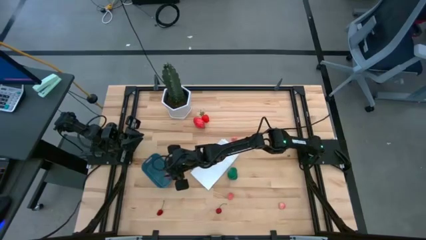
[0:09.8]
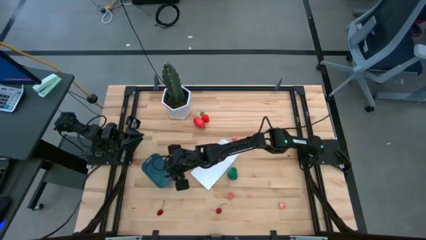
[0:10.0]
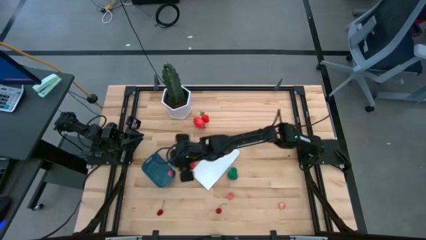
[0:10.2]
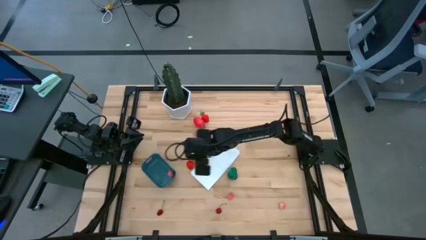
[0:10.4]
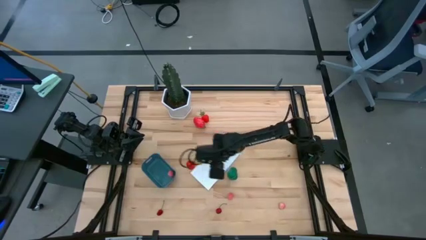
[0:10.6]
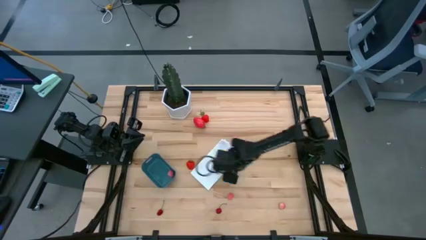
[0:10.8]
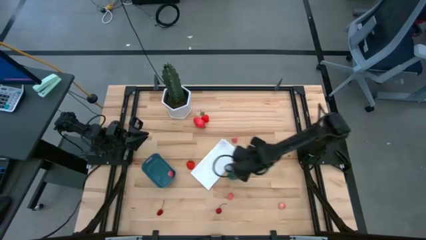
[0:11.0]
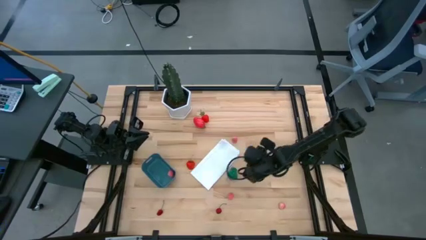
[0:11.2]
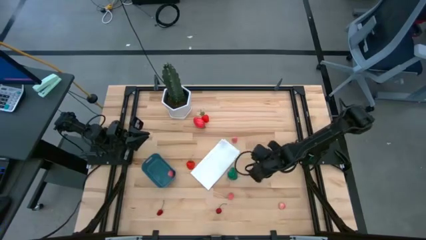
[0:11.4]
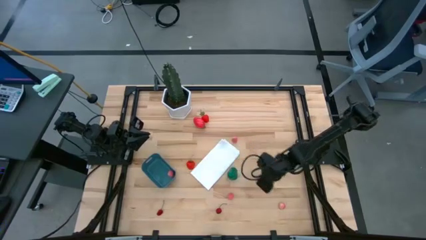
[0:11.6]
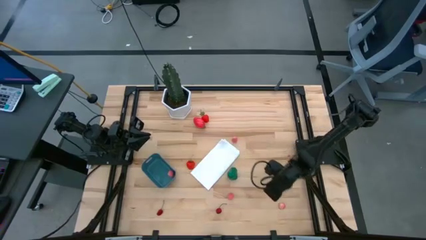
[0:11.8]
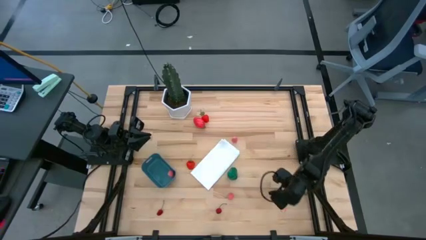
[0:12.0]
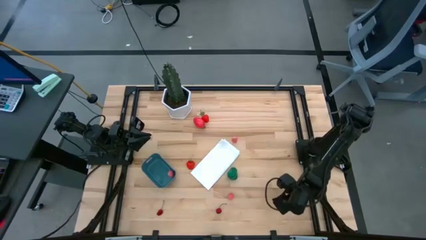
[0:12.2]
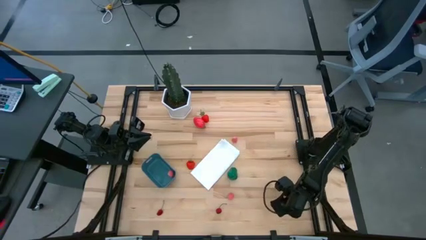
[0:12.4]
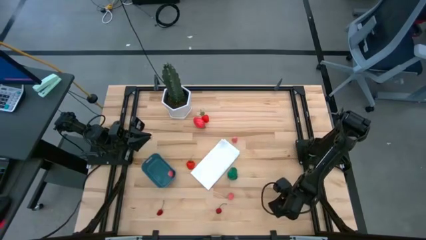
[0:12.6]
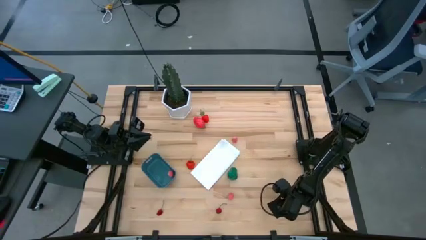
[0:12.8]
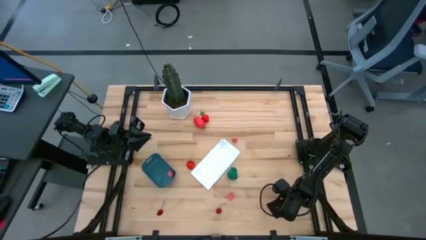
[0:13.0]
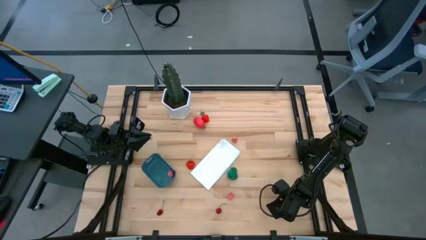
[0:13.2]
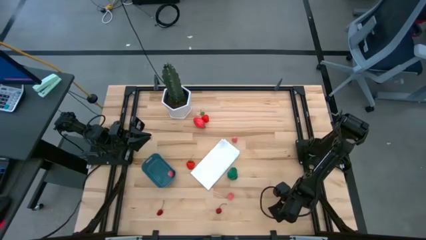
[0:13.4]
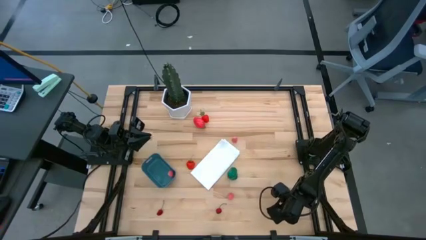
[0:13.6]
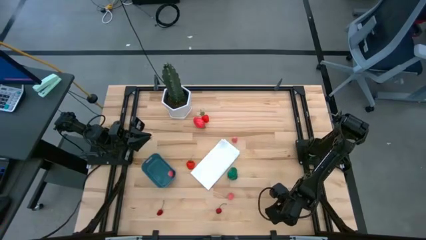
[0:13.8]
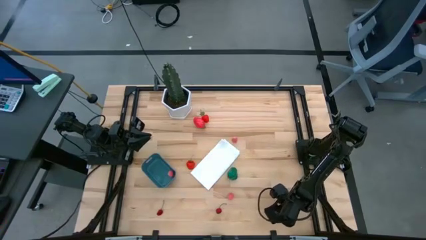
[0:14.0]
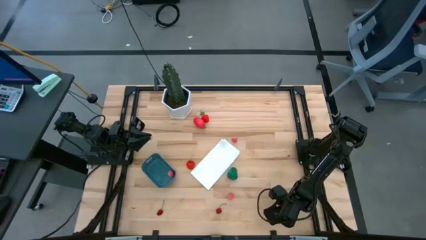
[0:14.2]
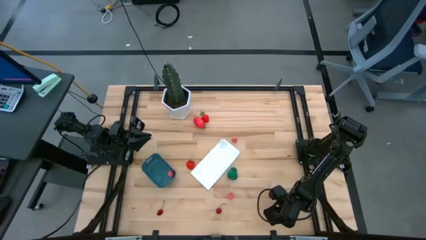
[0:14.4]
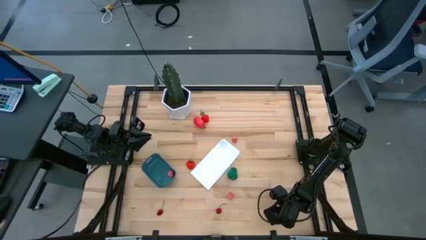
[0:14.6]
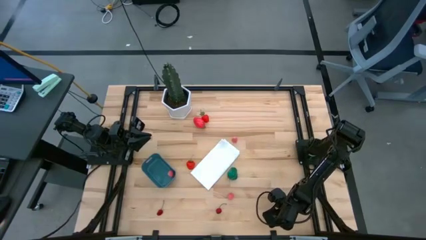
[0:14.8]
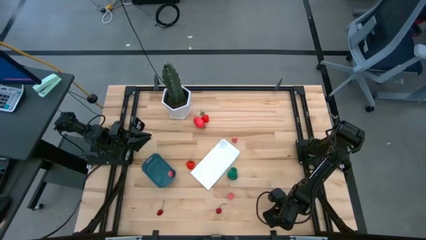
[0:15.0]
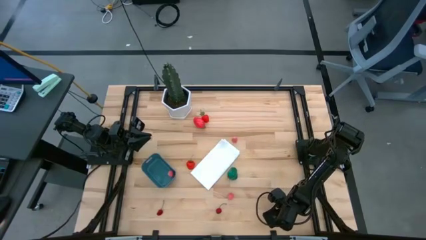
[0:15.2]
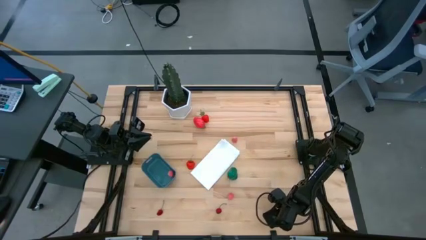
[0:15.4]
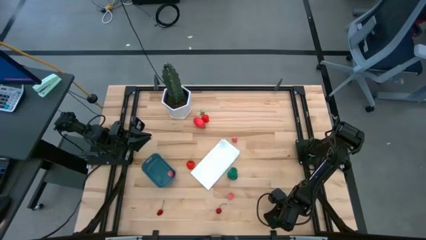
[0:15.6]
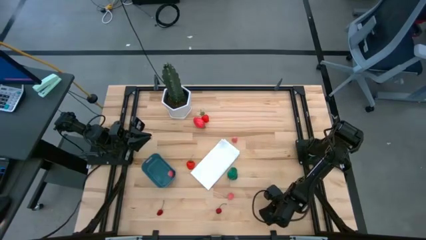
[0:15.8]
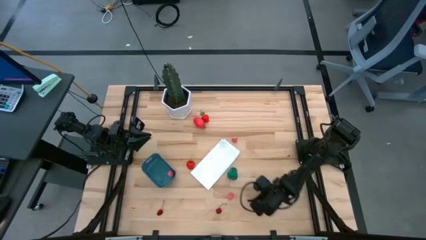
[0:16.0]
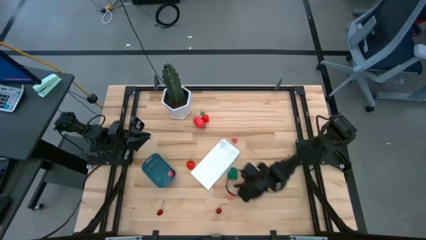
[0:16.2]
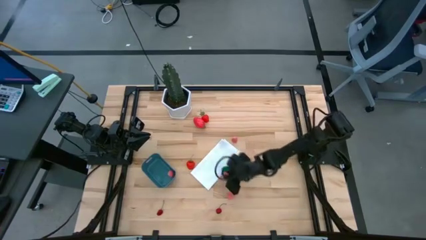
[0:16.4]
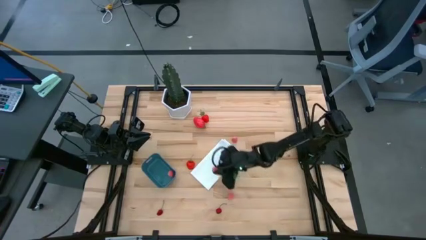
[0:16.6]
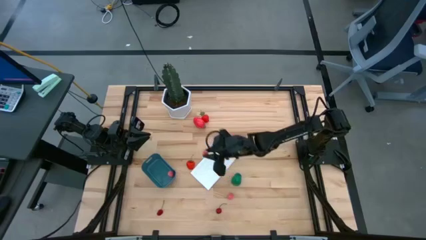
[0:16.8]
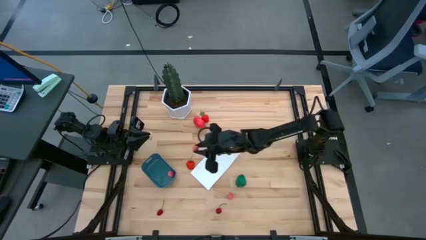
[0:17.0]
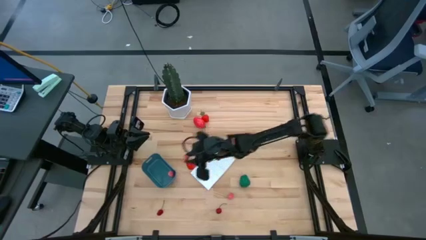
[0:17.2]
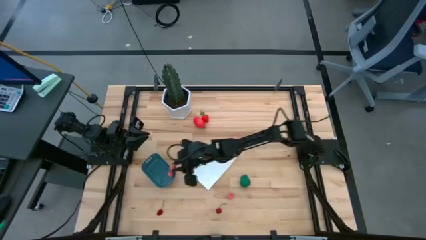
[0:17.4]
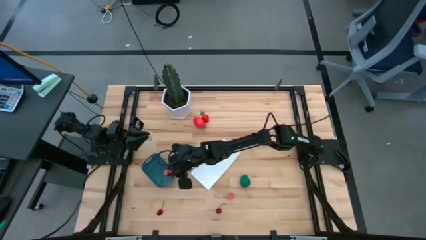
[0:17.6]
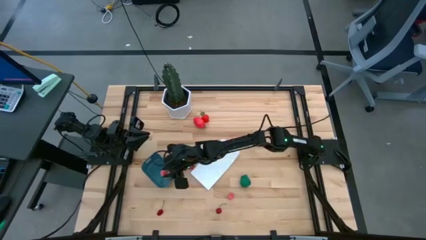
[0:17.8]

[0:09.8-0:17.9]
Task: Pick and placing Produce into tupperware
Put the peach into the blue bin

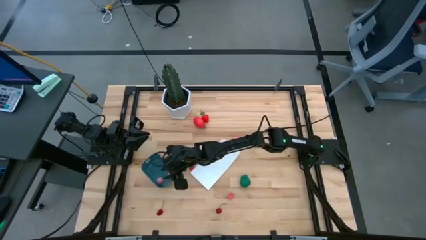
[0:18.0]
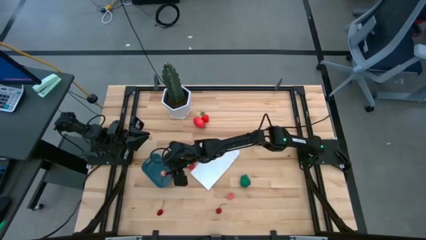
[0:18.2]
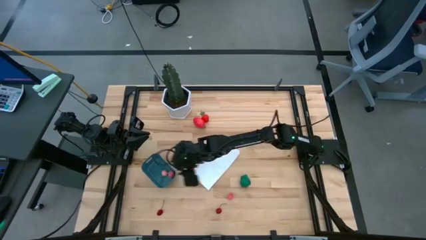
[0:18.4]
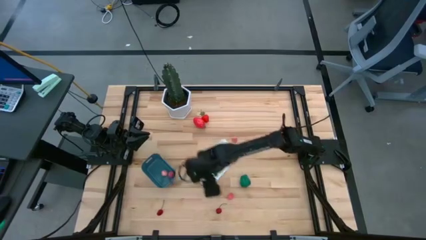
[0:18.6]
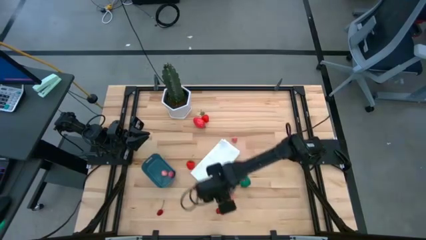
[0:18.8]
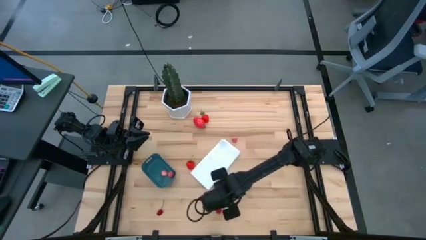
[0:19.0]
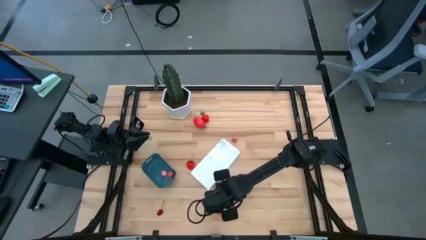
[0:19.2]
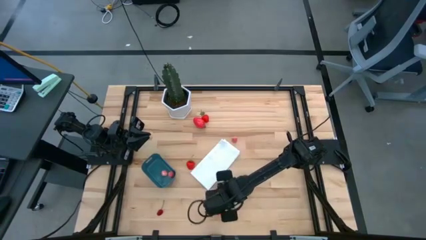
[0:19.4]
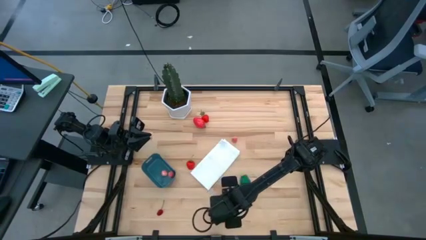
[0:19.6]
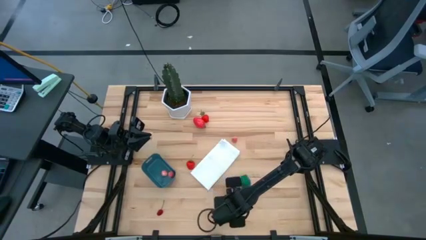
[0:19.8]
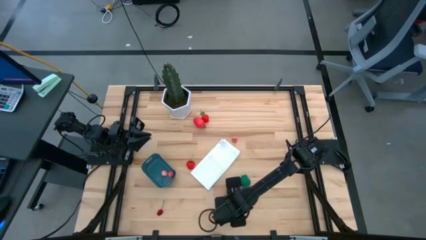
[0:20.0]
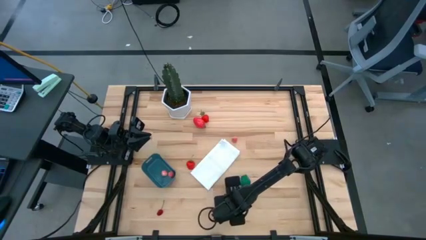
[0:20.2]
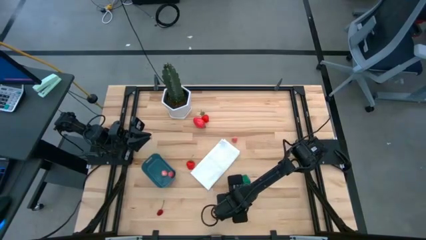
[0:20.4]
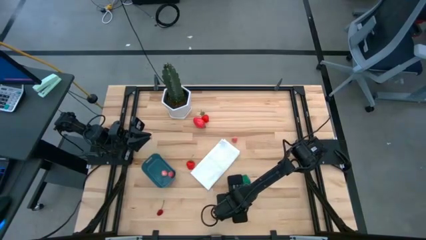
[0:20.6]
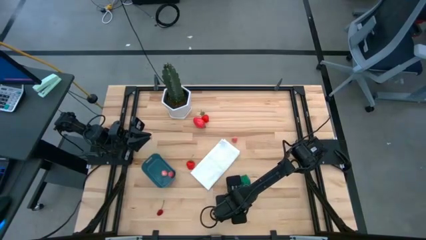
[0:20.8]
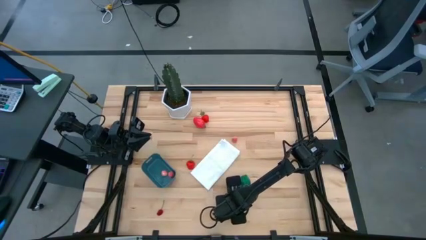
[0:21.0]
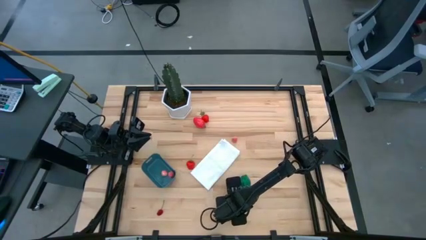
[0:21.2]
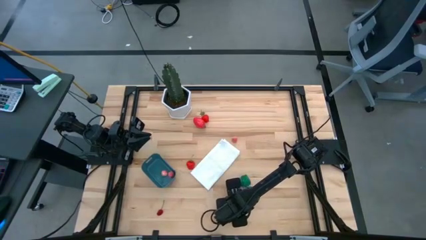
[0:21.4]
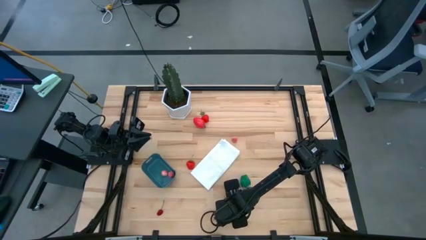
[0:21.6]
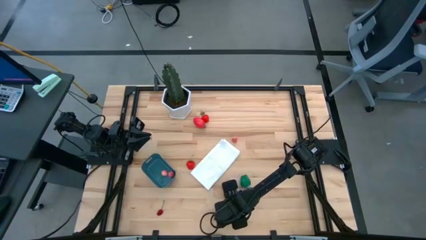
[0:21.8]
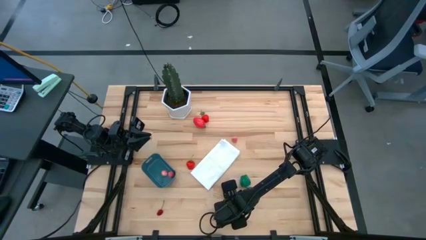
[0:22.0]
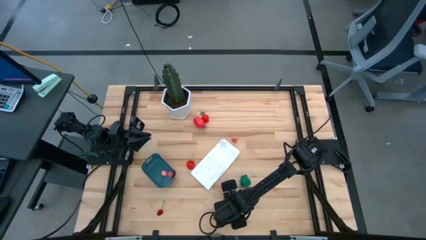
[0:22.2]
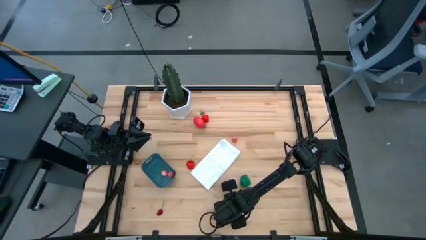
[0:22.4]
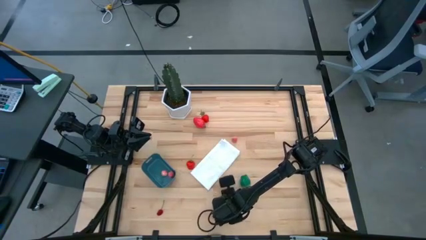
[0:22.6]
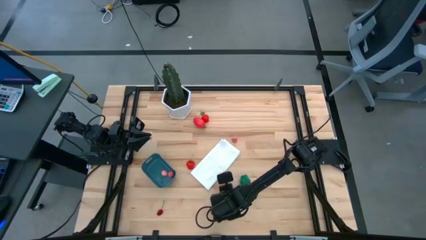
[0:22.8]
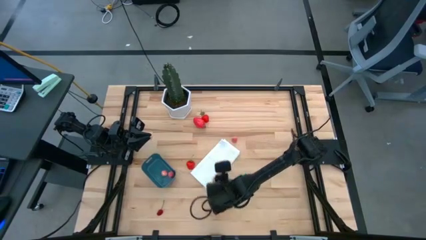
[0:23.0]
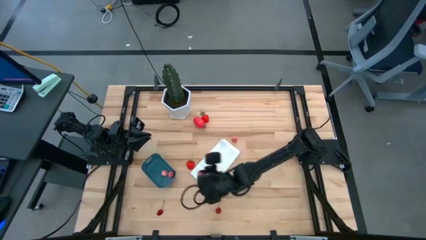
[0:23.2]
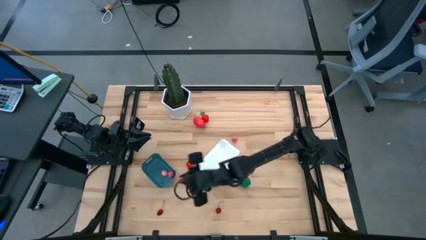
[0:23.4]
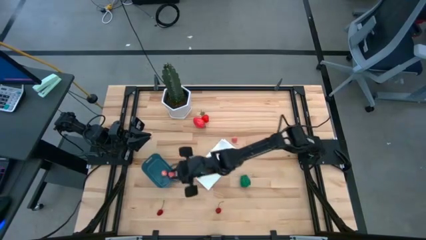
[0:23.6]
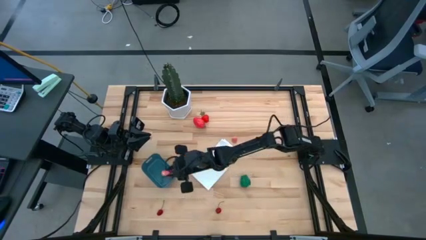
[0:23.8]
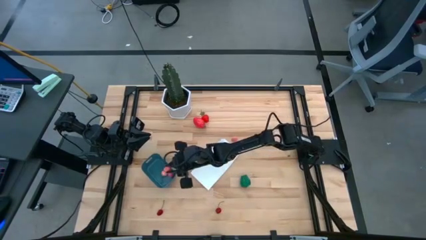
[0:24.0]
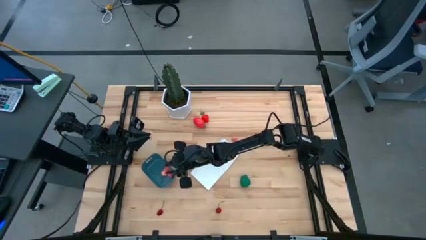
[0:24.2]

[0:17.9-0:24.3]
Put the peach into the blue bin

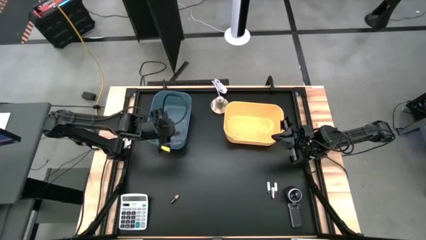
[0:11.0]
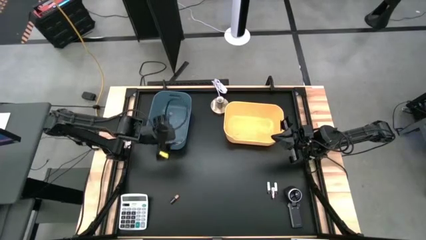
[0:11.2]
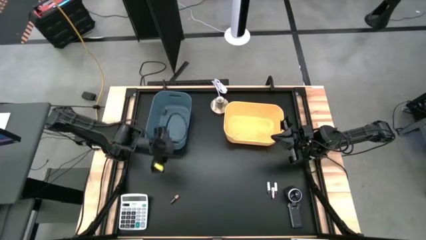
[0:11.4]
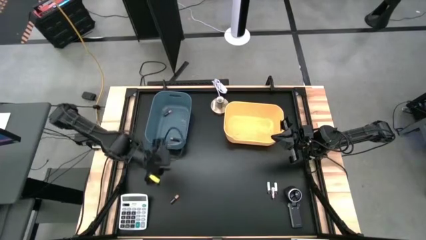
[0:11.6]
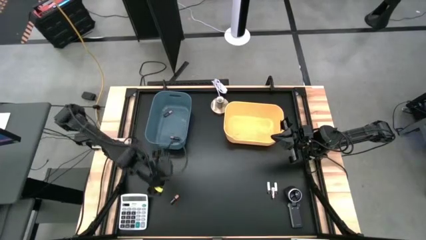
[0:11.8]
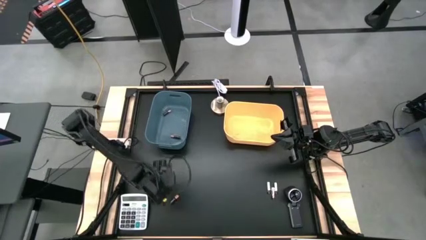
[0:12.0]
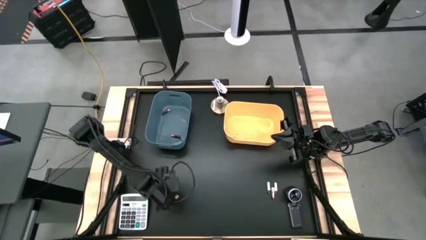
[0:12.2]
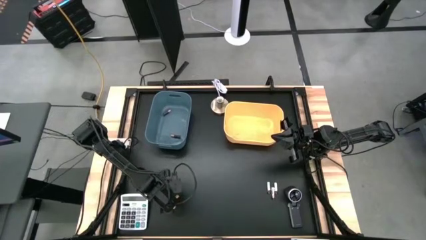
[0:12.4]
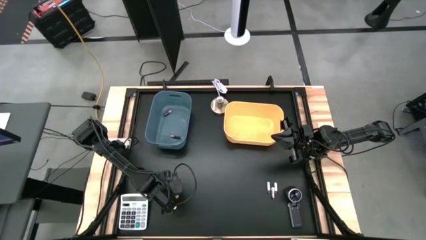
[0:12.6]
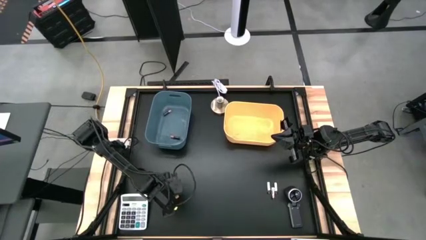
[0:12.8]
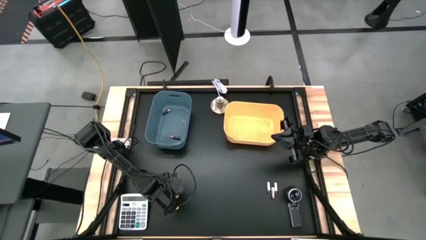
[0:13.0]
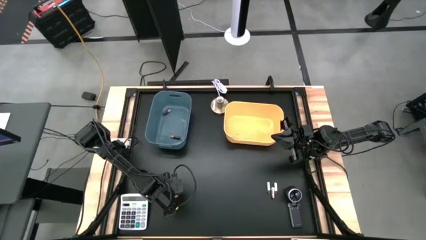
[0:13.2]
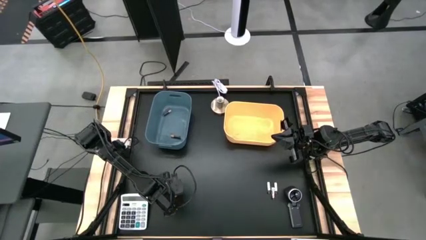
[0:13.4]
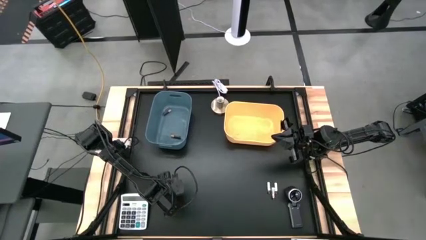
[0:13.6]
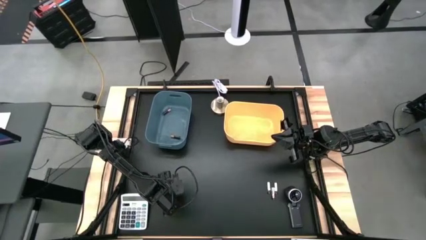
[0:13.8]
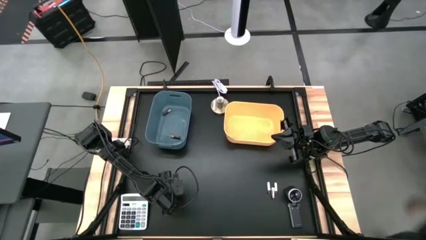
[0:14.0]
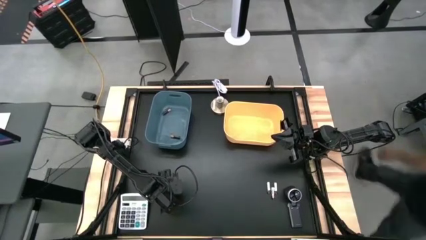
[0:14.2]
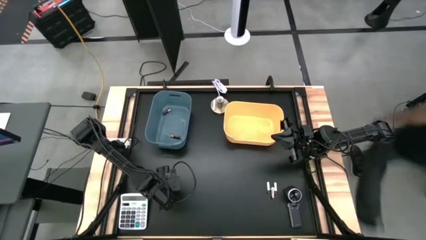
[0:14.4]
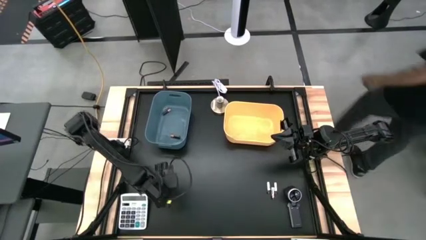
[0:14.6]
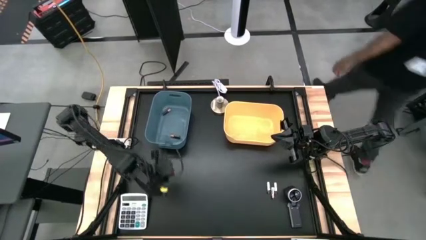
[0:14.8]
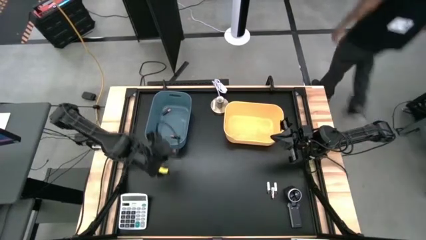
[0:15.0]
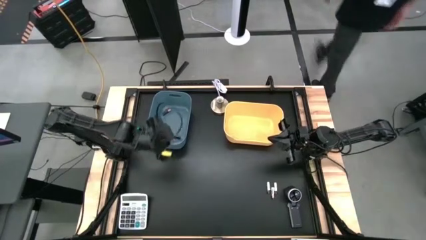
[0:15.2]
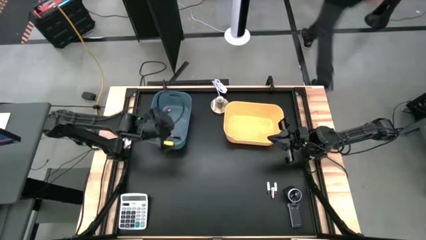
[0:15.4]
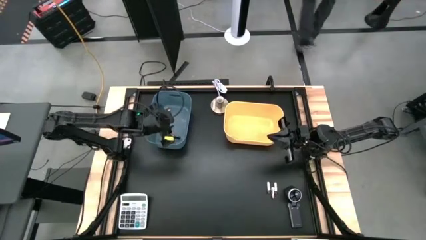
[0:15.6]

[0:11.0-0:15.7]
Task: Sort batteries
Put the black battery into the blue bin
